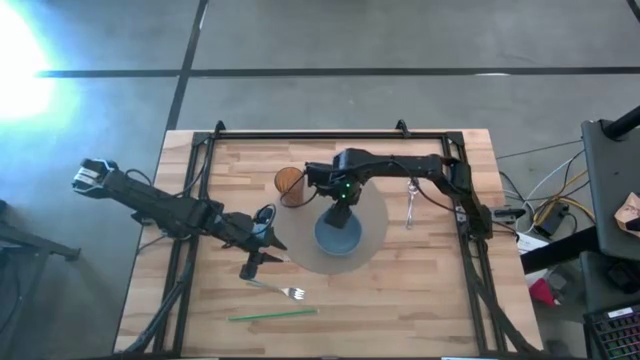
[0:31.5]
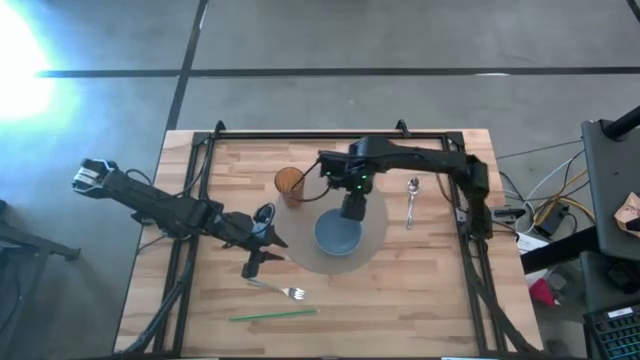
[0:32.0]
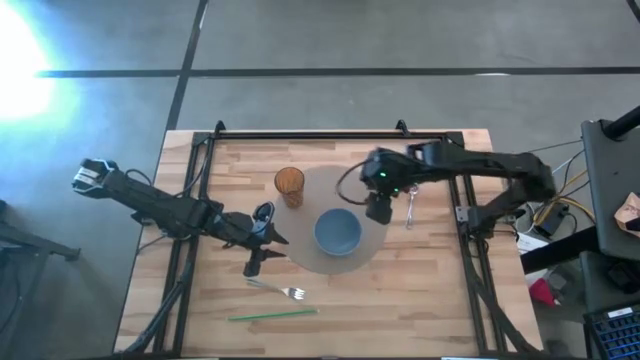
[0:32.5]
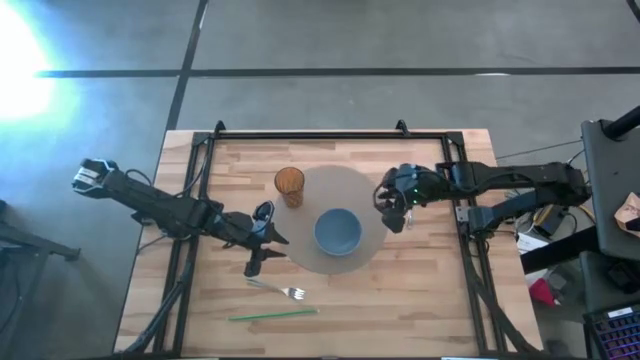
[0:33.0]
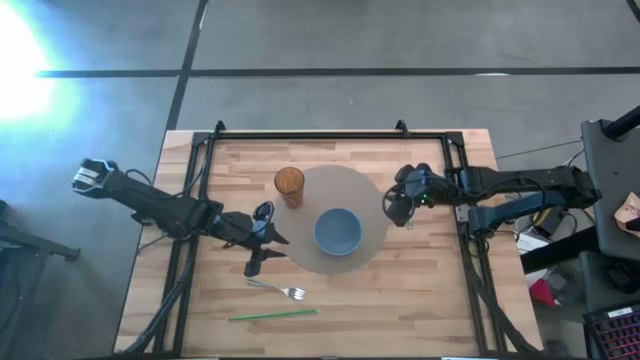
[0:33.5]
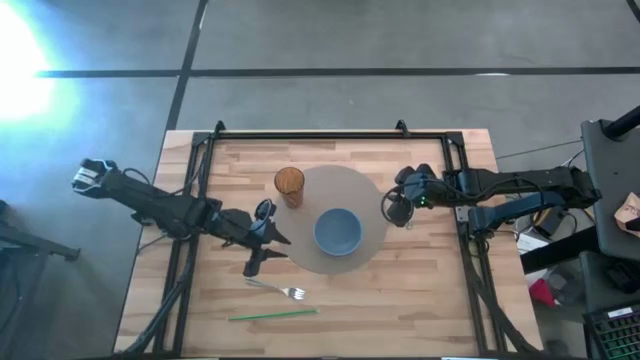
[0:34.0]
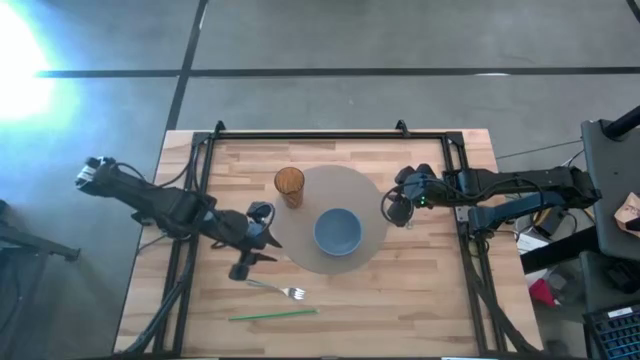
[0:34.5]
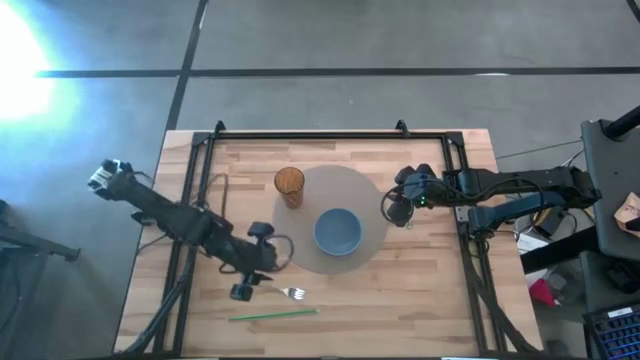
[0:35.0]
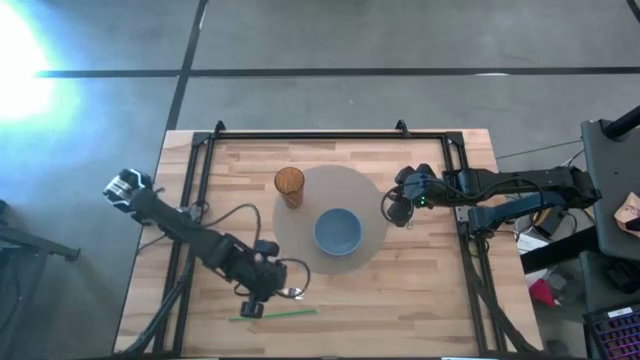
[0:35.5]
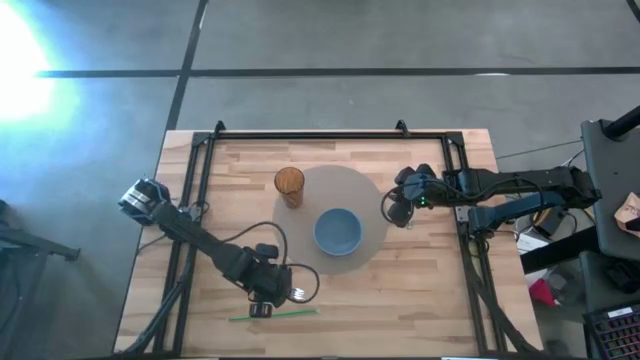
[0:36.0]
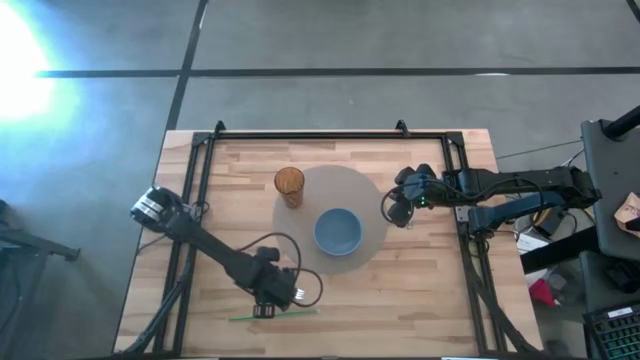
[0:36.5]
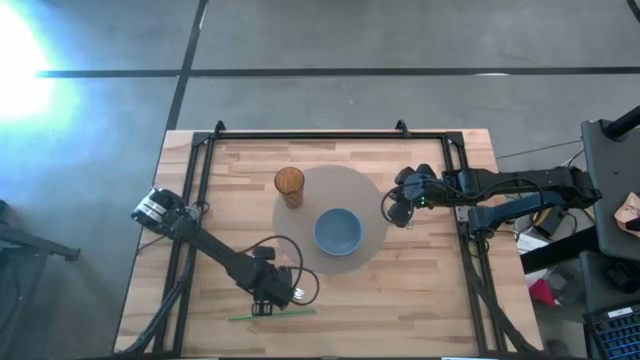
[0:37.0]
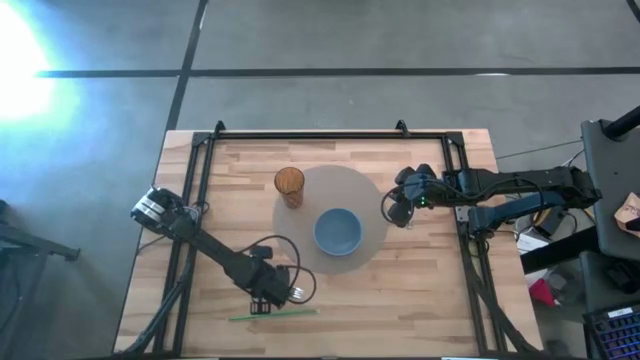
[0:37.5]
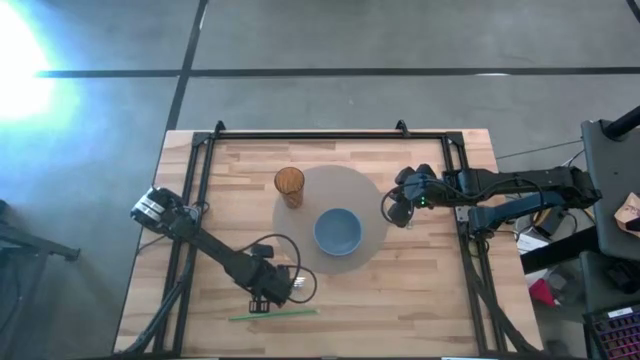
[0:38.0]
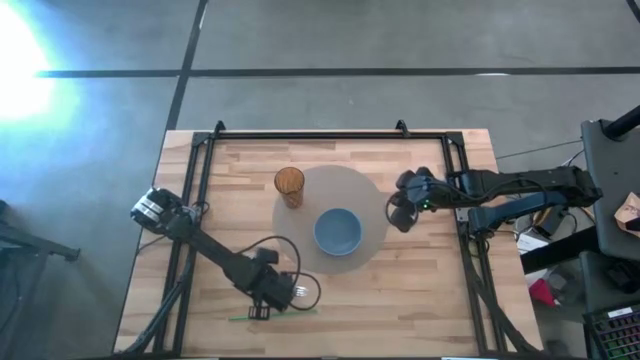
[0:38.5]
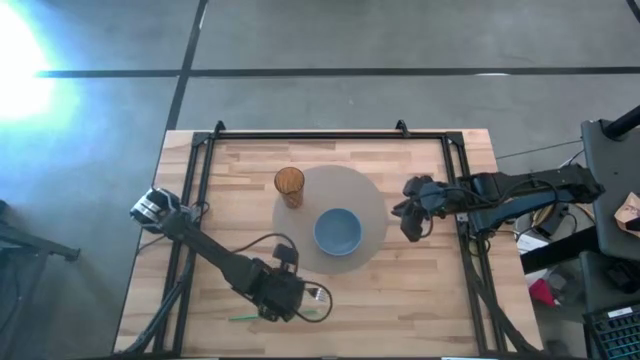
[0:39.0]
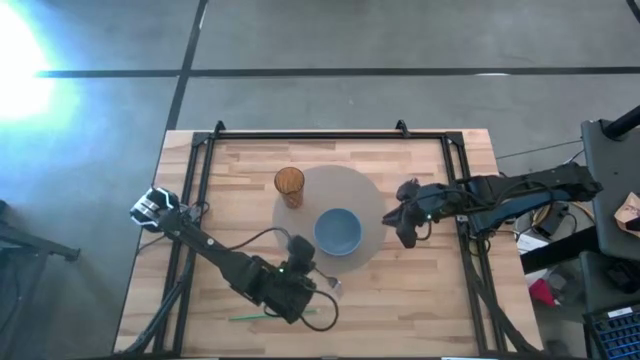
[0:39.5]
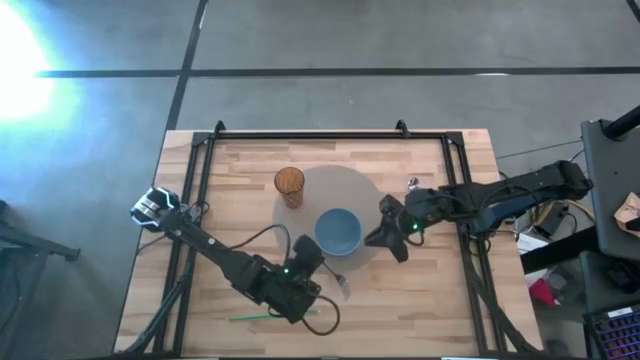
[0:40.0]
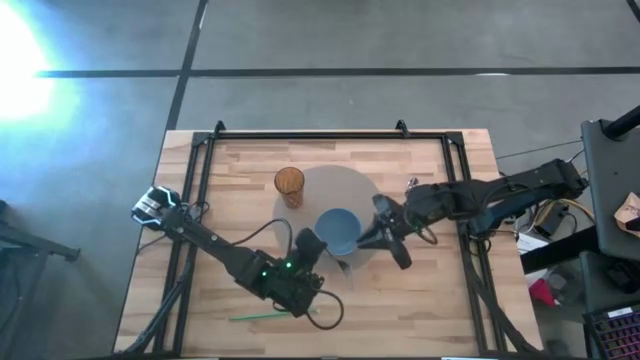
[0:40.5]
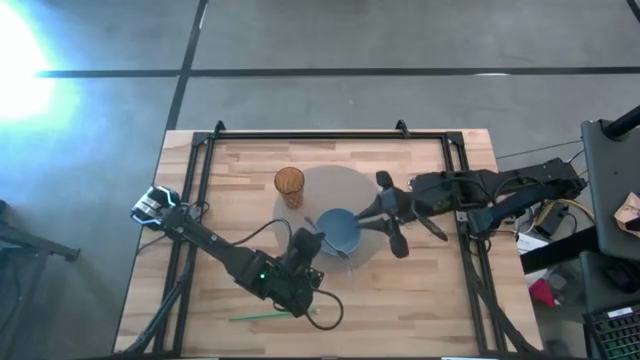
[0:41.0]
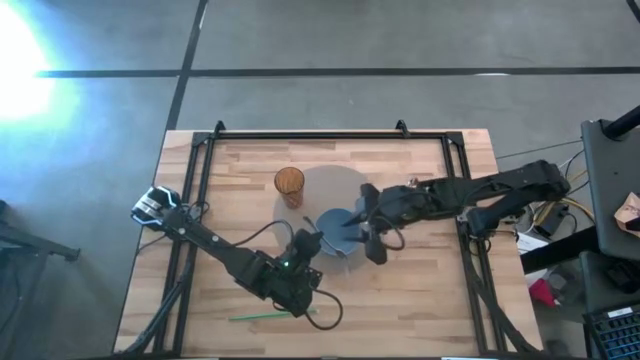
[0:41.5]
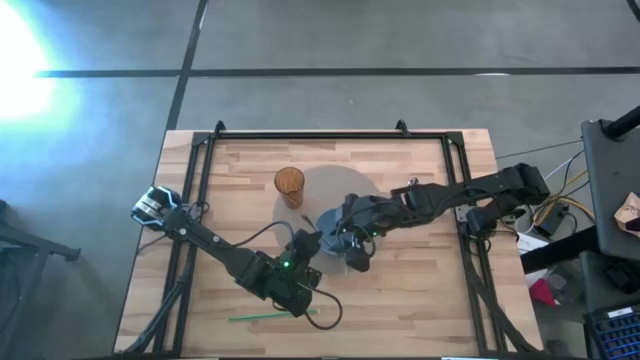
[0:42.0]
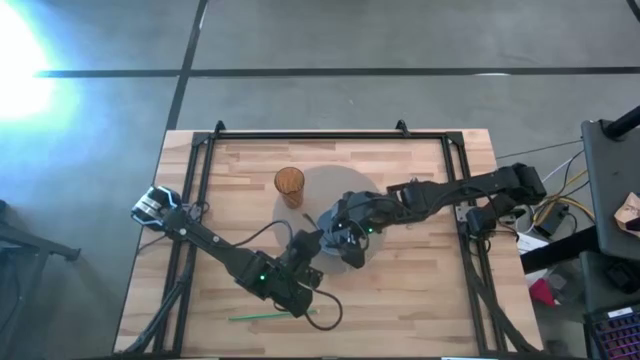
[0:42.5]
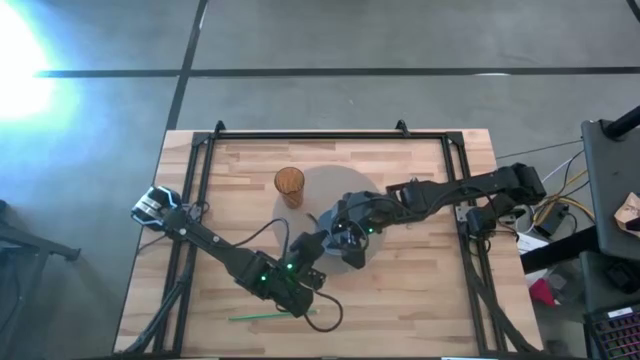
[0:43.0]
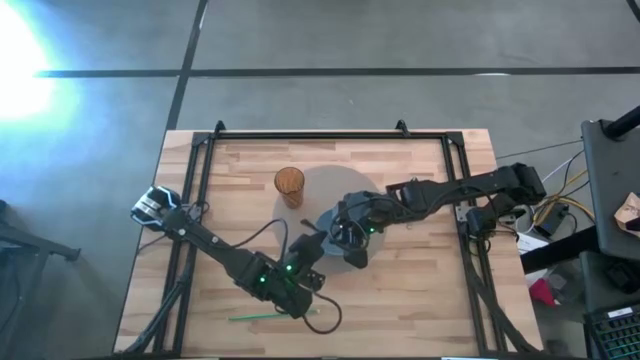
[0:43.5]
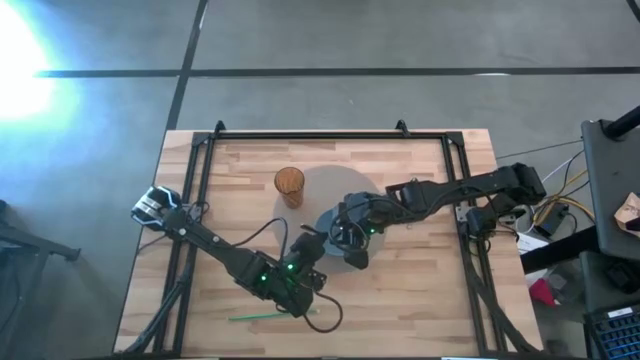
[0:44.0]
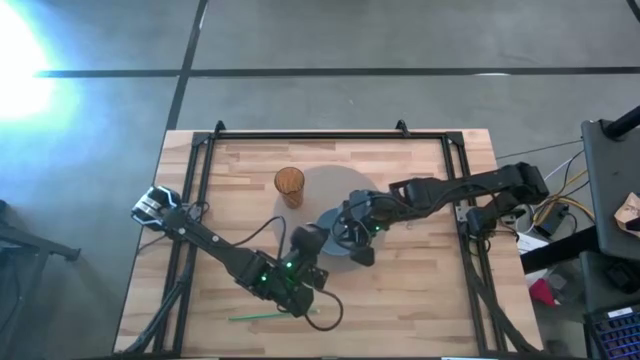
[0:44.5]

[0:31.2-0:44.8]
Task: Pick & Place Utensil
Put the fork into the bowl

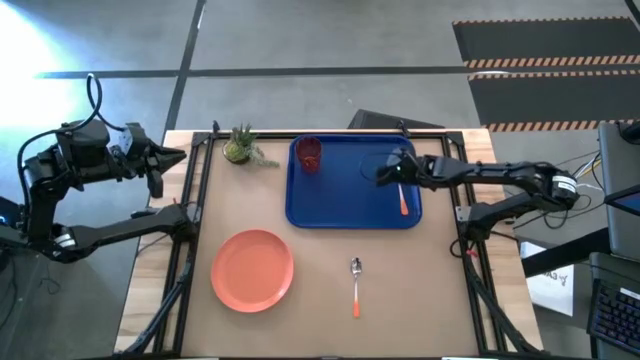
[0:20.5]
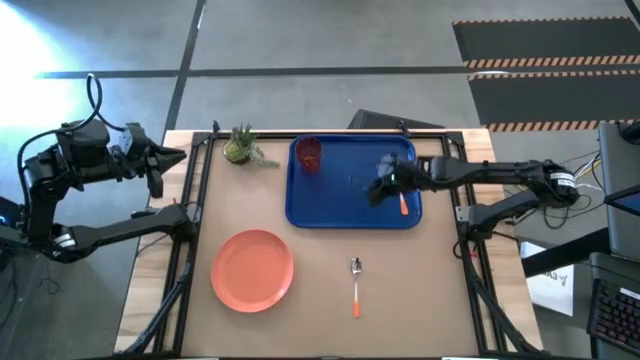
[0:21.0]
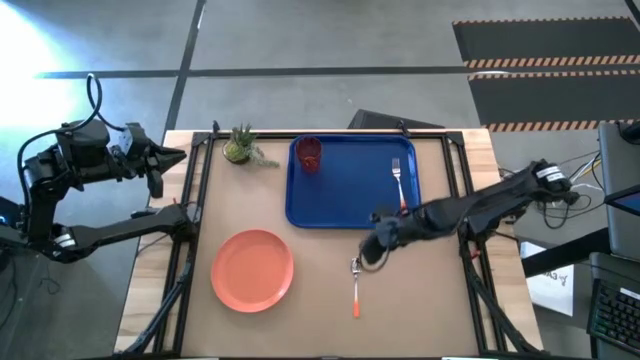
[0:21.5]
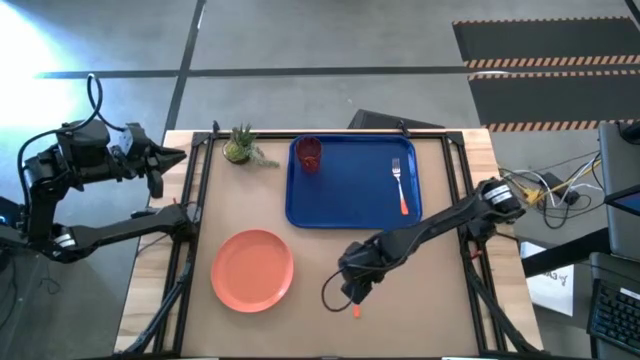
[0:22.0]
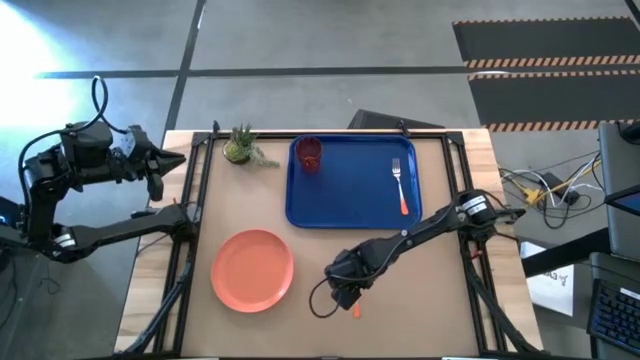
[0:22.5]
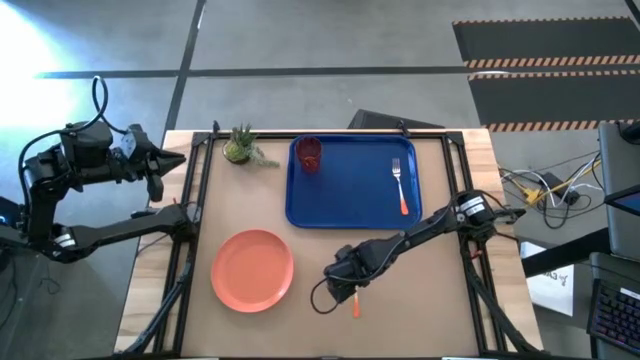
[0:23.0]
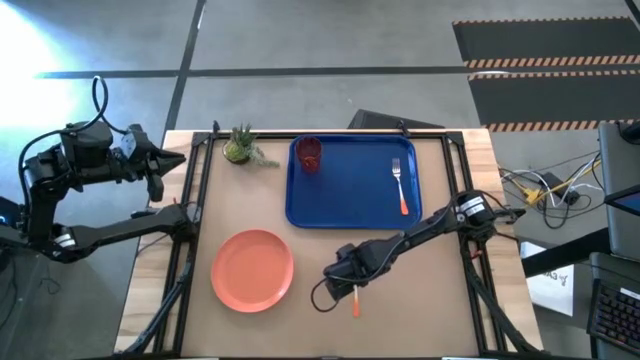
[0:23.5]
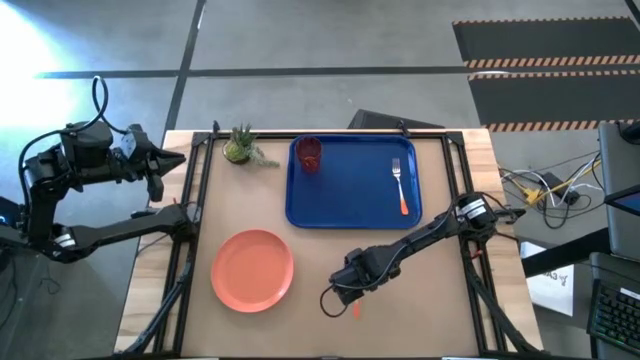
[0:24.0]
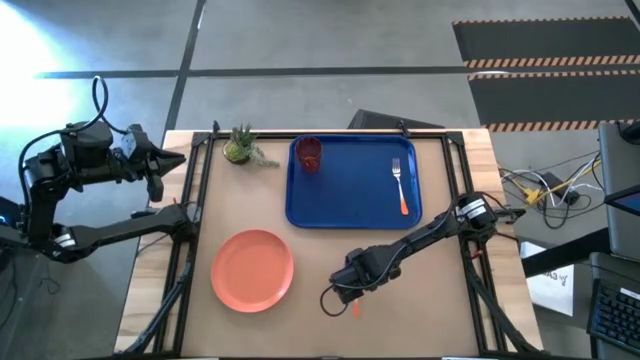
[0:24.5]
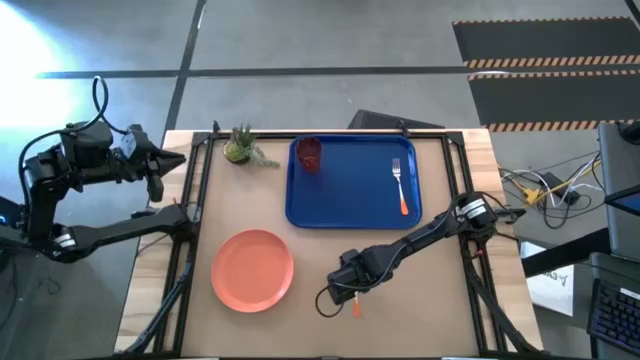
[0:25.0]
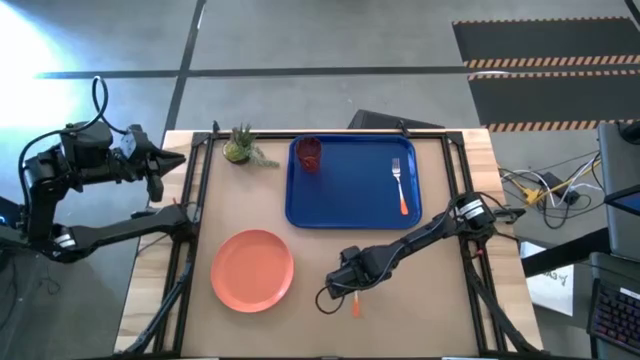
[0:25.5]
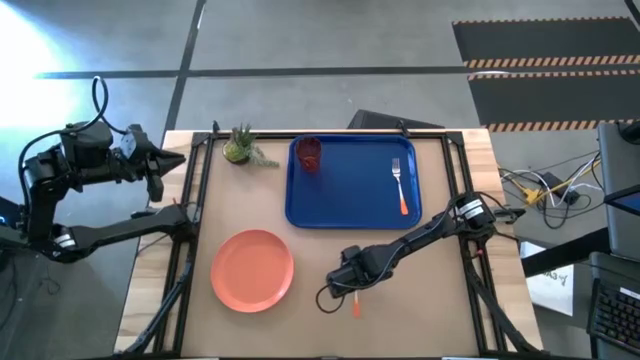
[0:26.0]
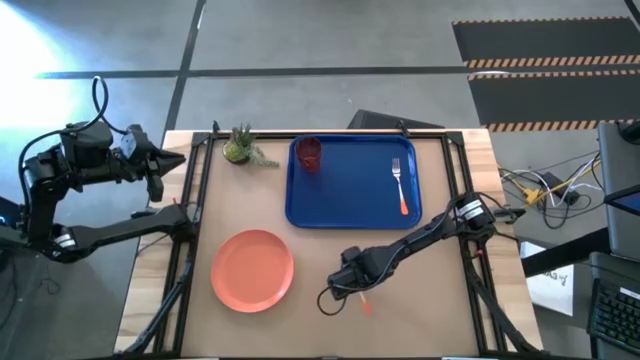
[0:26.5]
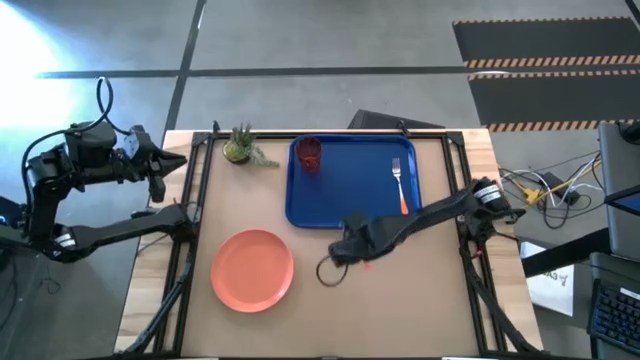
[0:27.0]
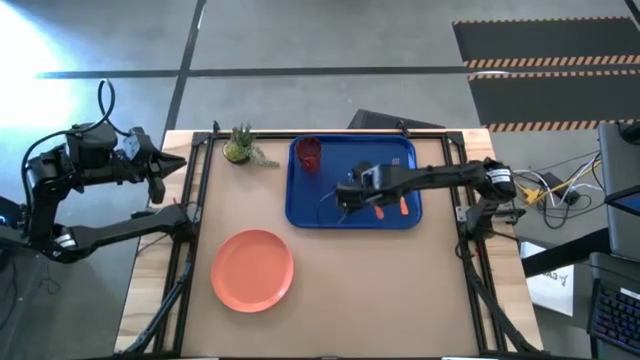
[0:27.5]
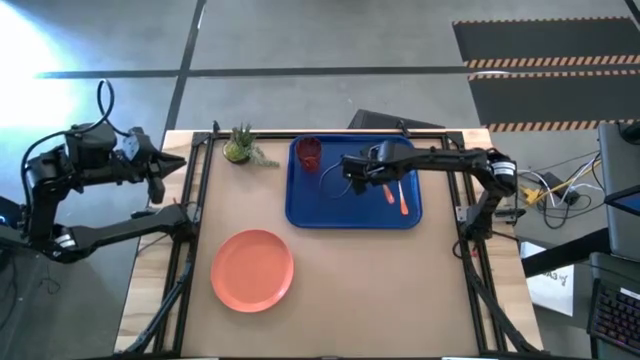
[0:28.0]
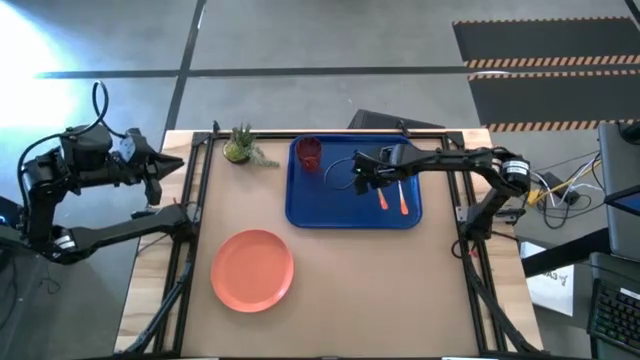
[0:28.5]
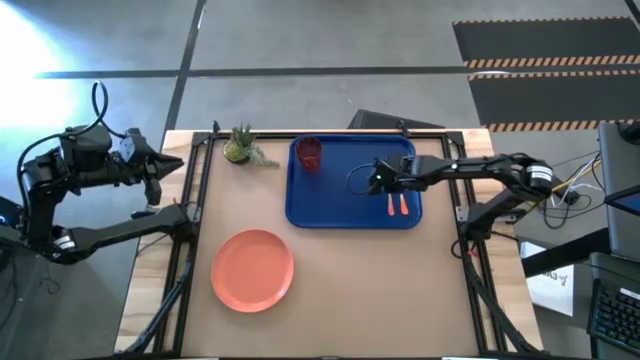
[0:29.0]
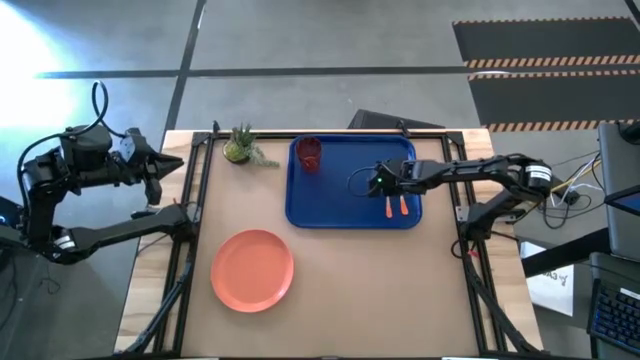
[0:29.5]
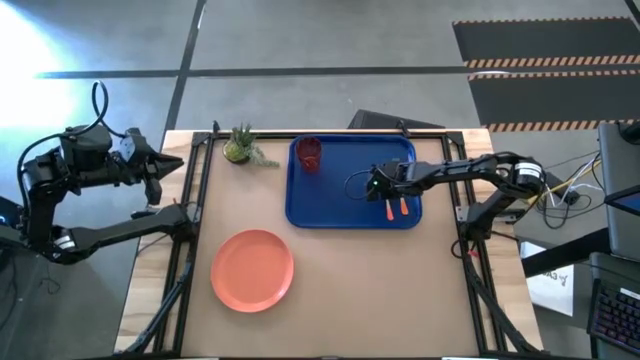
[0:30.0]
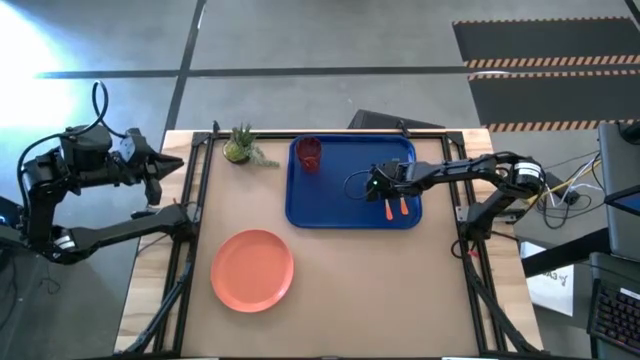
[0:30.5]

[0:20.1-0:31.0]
Task: Pick and place plate/cup/fork/spoon on tray
Put the spoon beside the fork on the serving tray
